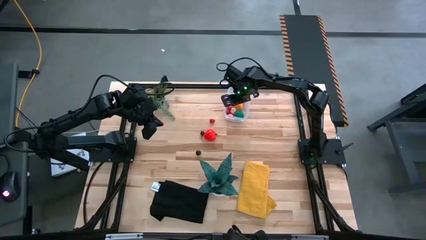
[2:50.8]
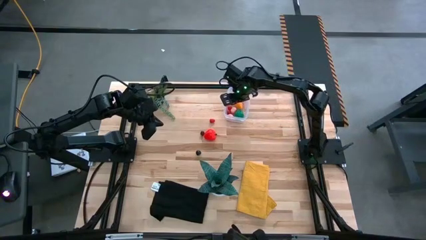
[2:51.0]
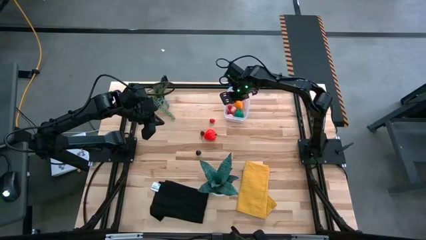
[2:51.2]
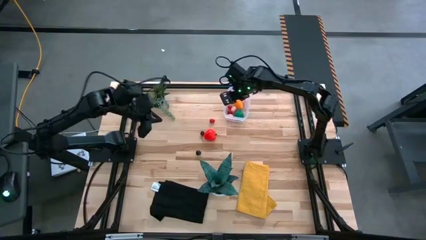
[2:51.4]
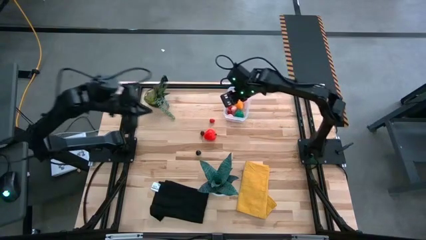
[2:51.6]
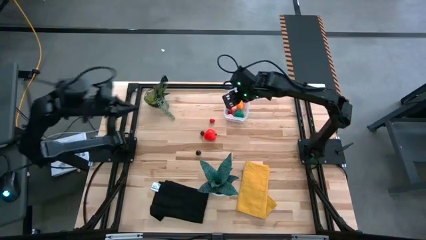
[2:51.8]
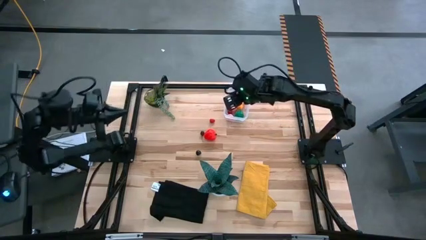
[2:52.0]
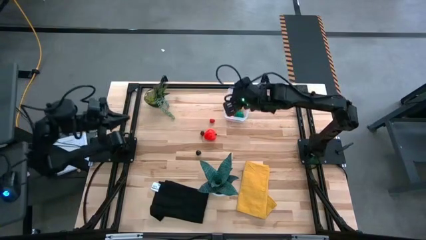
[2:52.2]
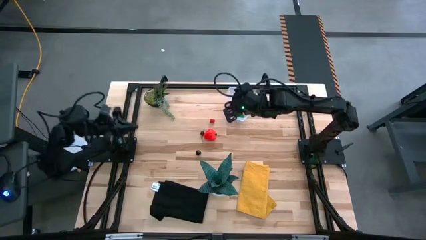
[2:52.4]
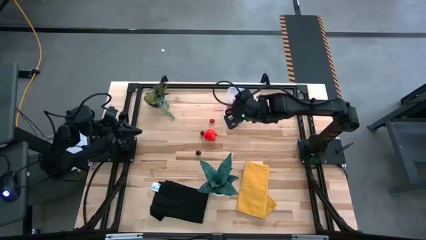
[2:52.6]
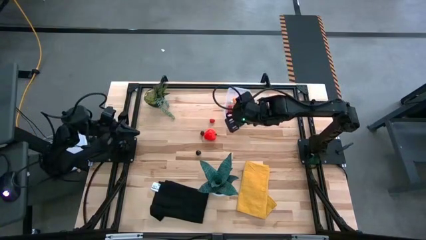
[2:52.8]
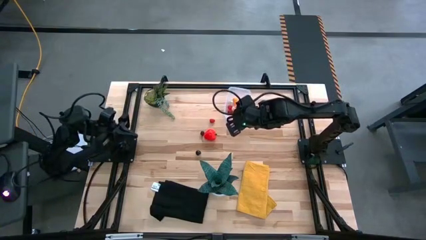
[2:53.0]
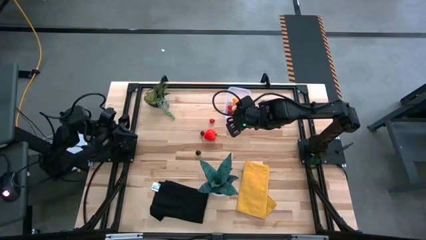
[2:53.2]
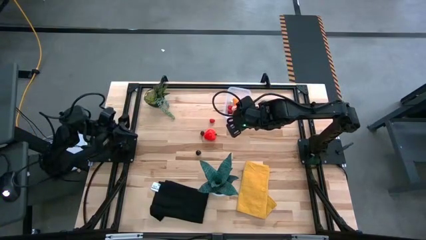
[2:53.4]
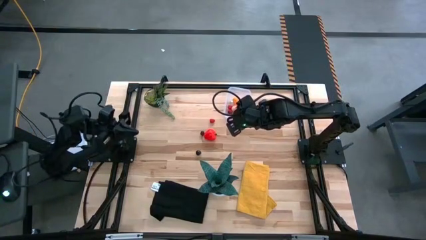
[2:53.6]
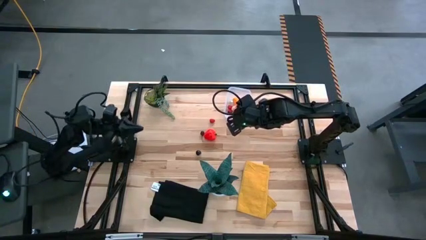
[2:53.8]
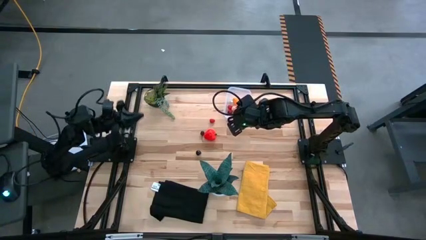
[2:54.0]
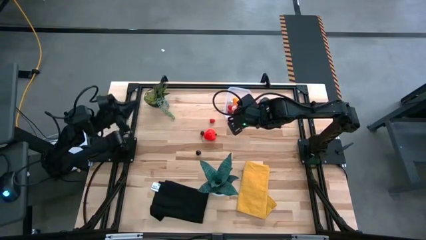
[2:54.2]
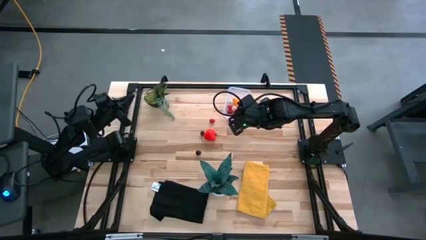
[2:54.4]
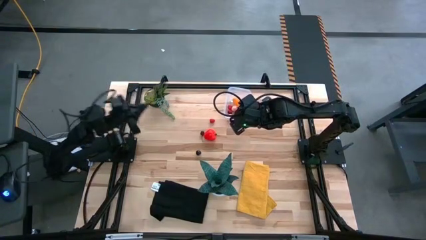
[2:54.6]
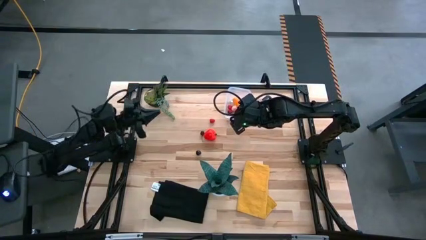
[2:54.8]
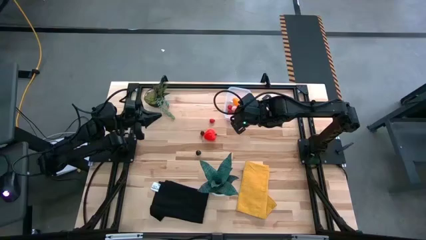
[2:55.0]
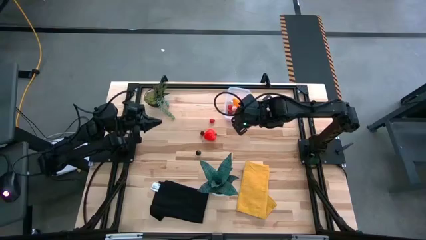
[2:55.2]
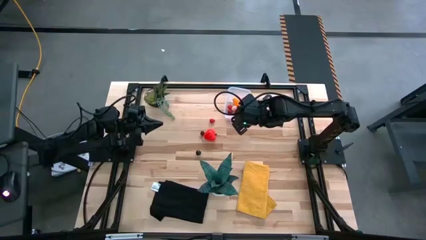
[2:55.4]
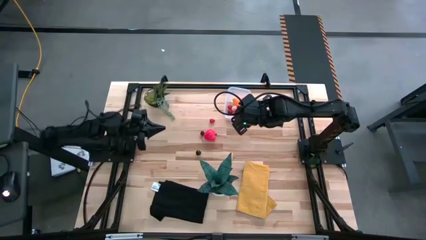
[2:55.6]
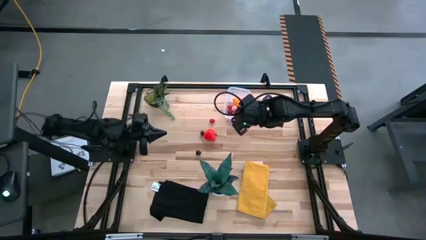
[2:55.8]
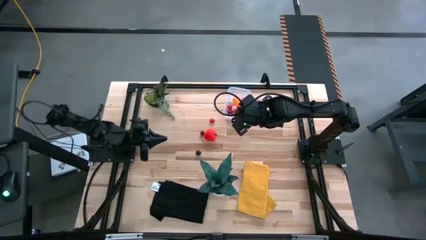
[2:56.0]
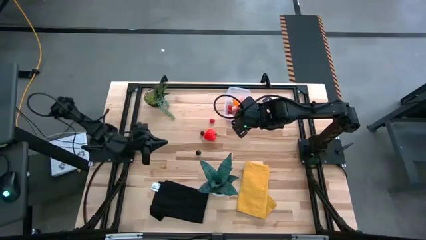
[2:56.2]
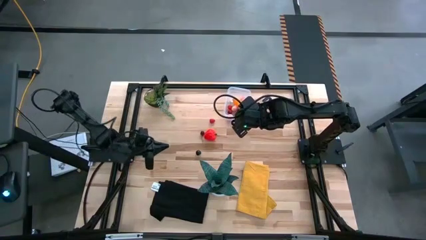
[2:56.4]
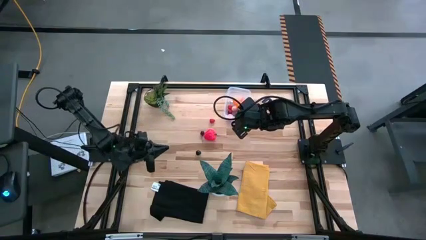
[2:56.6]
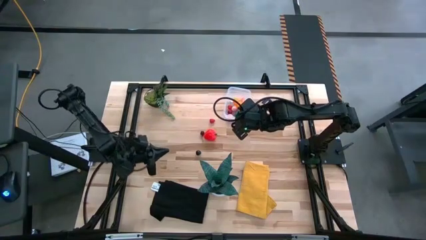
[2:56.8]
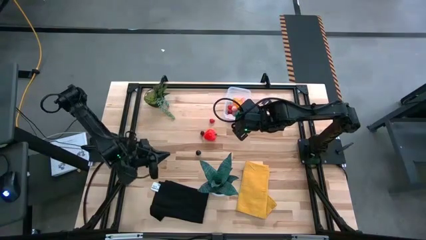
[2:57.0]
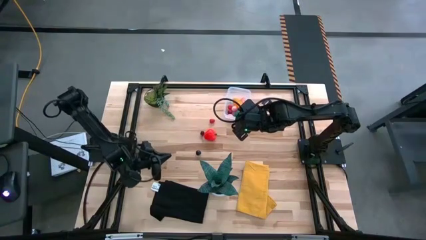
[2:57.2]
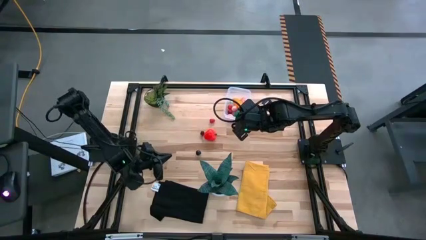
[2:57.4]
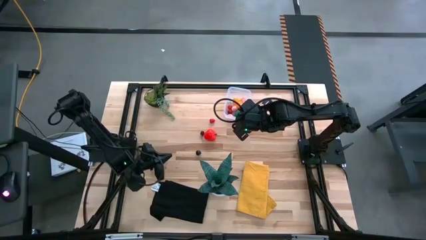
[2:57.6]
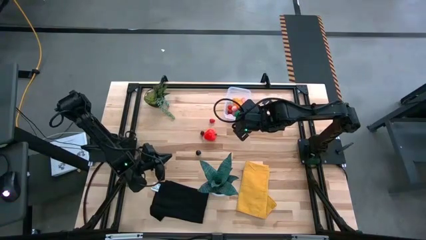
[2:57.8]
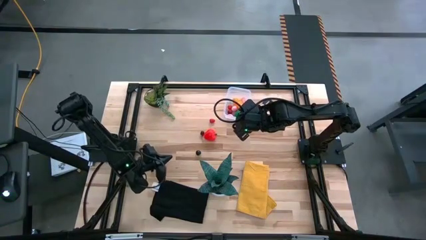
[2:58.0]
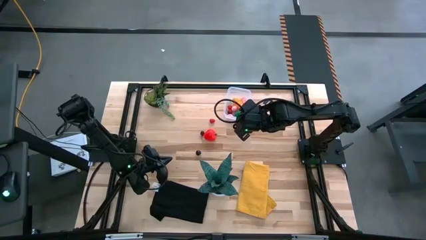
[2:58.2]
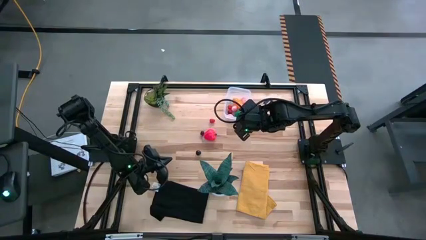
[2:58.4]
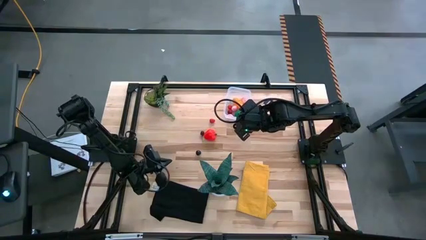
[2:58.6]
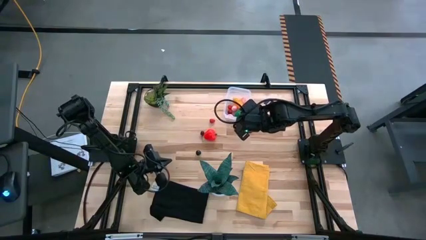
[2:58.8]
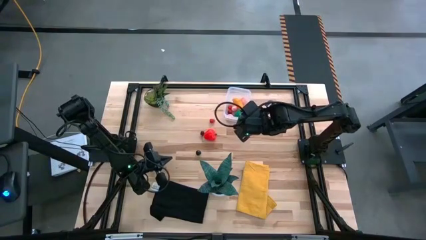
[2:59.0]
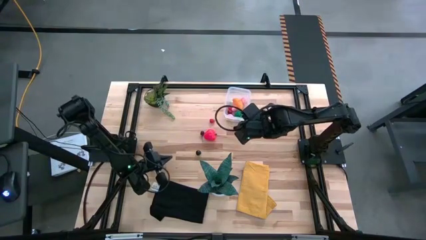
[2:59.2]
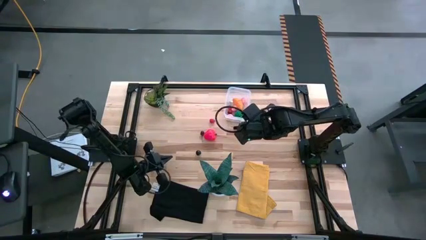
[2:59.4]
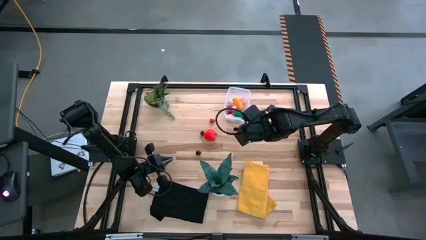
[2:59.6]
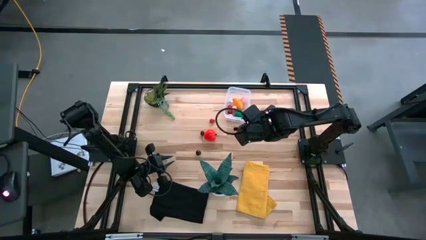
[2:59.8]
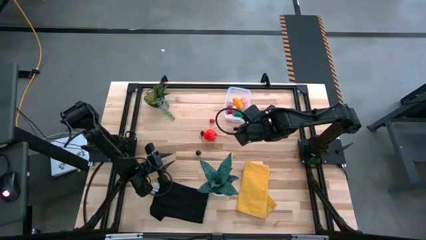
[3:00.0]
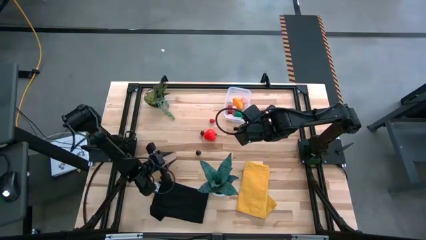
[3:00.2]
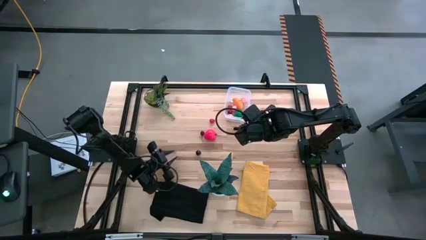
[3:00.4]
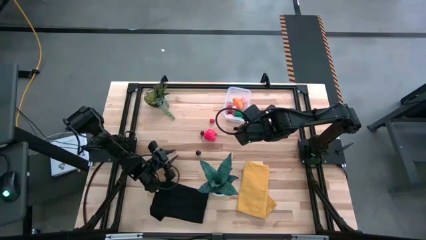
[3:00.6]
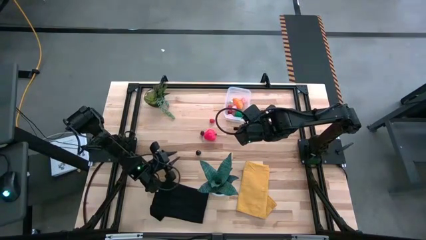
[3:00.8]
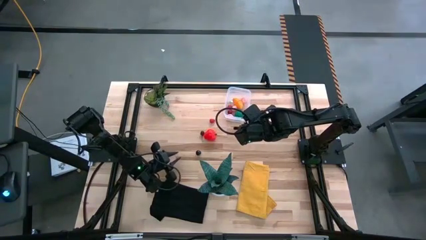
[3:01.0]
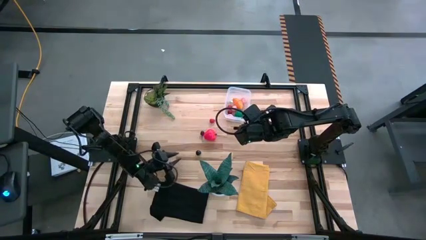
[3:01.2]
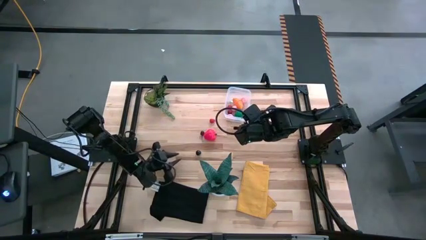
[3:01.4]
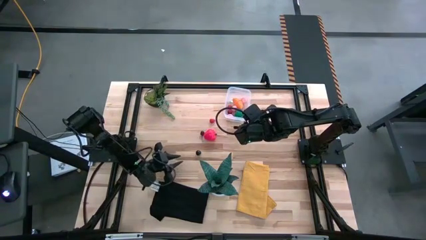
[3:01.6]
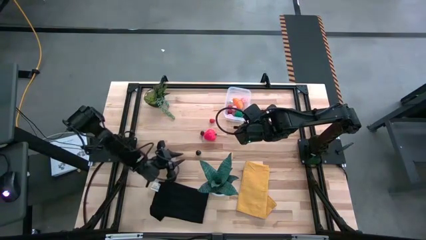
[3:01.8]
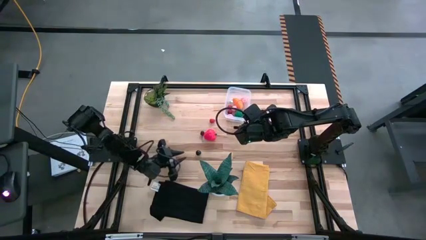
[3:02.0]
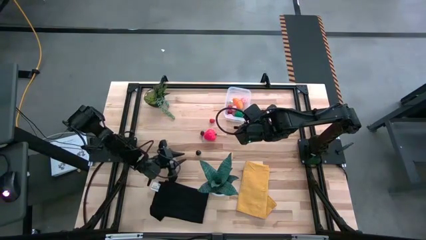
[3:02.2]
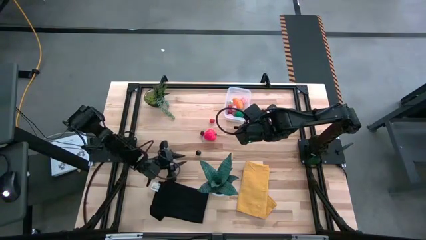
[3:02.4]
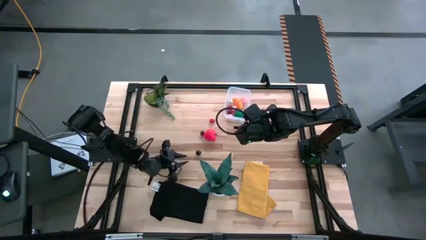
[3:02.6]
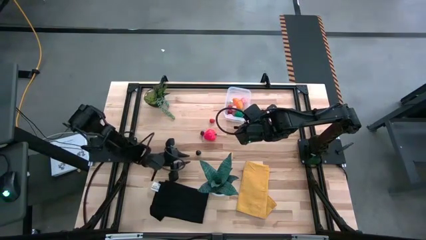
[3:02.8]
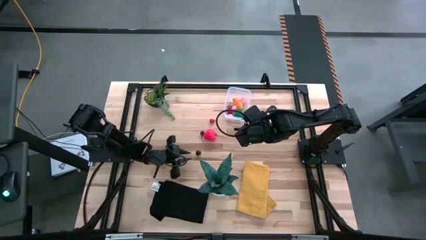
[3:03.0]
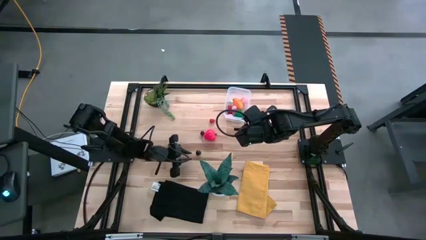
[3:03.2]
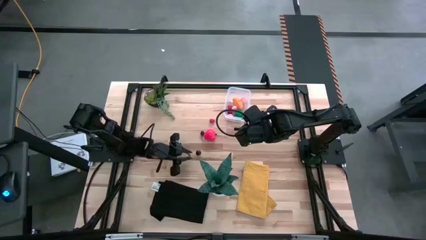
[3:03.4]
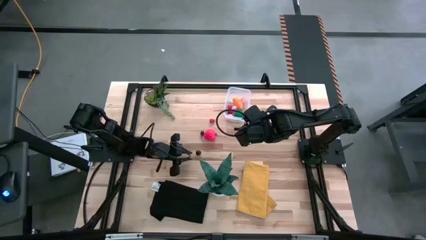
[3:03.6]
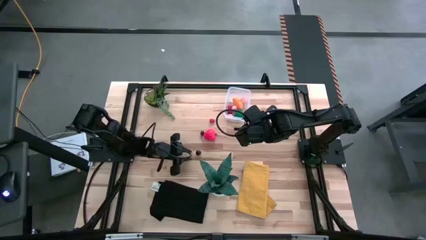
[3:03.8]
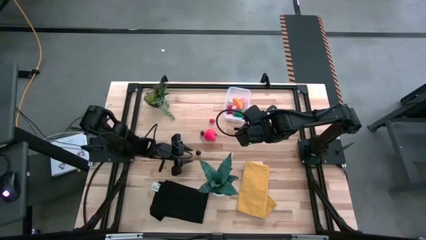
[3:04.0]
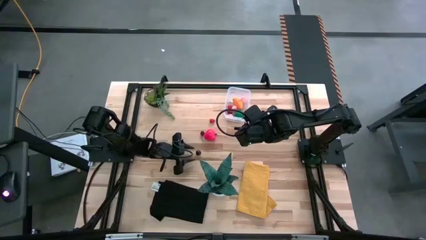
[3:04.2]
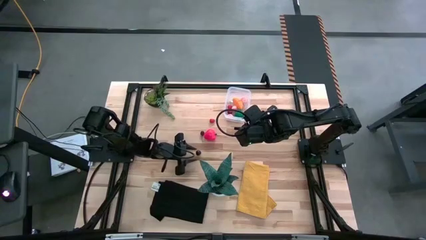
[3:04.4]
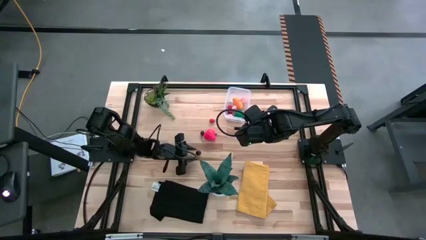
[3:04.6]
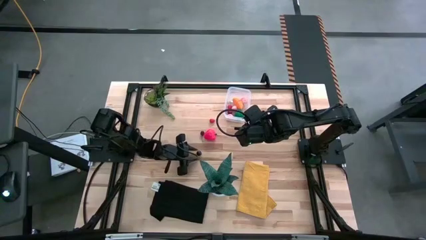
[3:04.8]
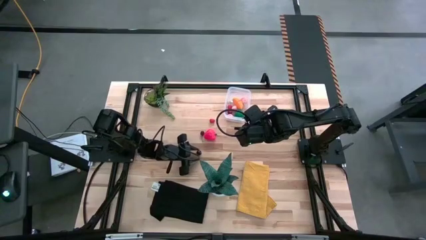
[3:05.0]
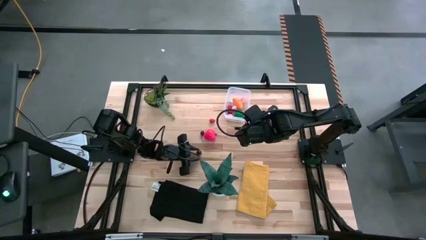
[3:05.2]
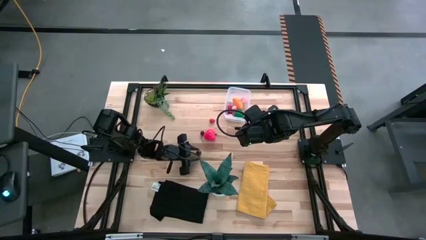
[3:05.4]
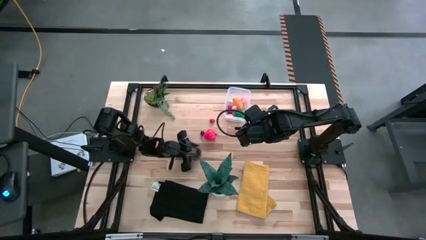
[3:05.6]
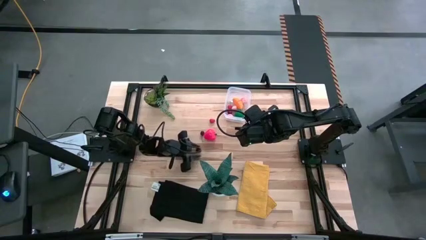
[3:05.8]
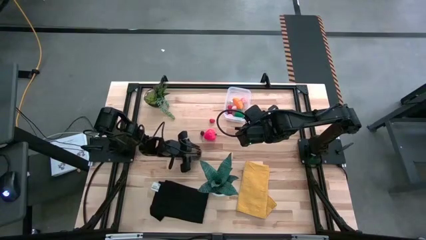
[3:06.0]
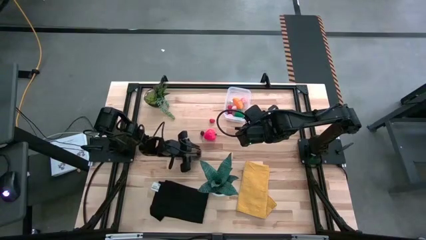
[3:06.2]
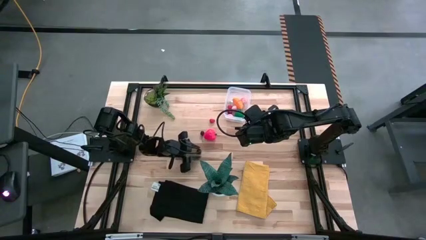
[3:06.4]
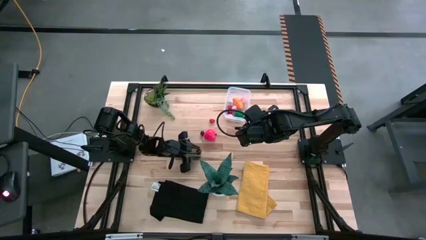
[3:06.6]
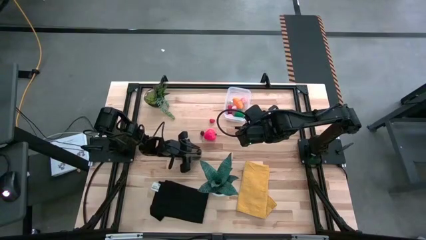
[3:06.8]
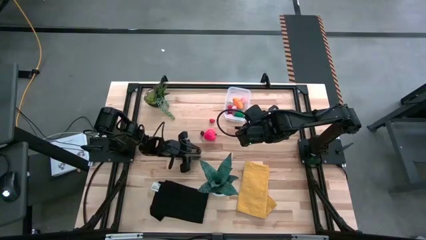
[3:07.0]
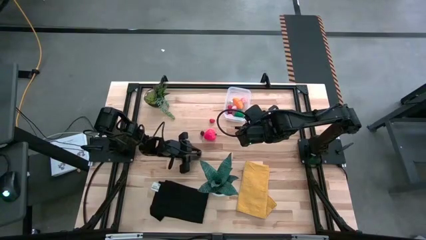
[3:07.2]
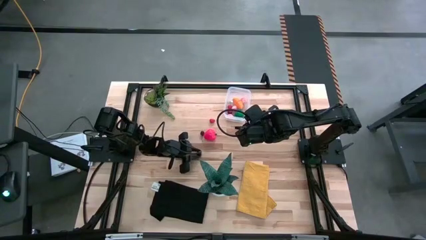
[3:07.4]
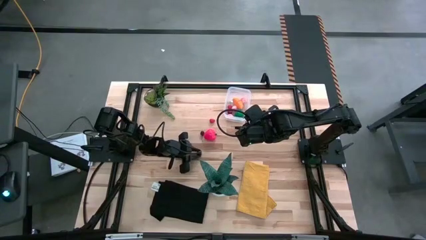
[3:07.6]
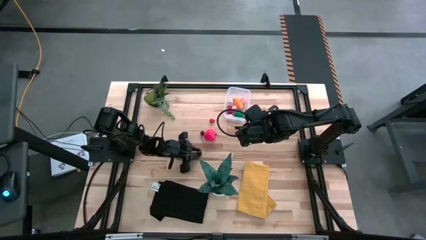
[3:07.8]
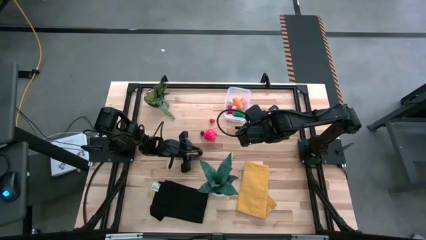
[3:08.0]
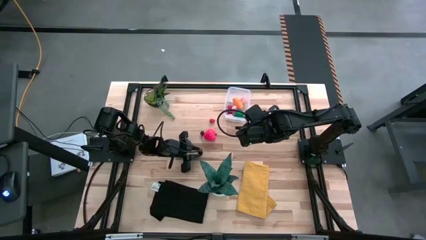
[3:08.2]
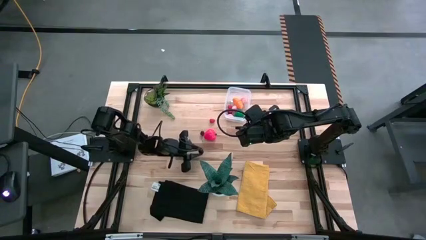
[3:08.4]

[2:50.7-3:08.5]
Task: Pick and placing Produce into tupperware
Put the black cherry into the transparent container
